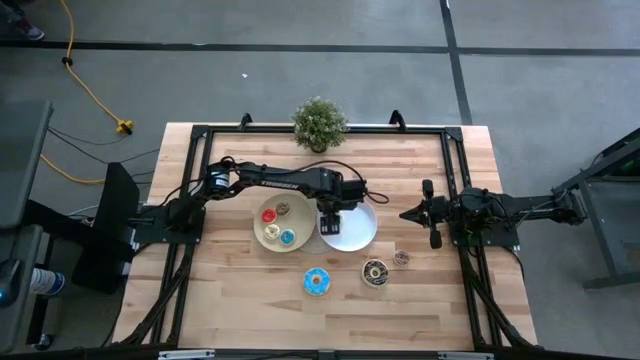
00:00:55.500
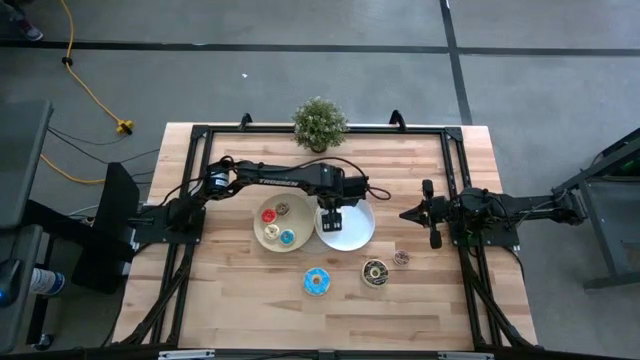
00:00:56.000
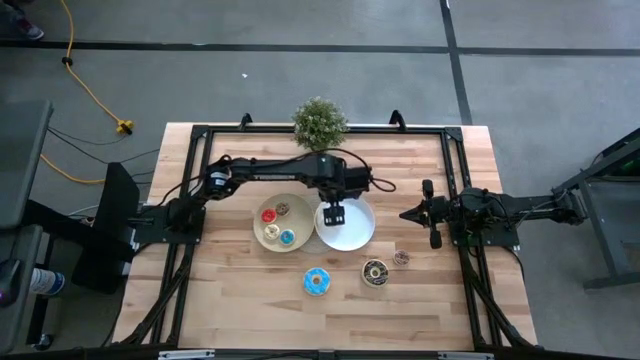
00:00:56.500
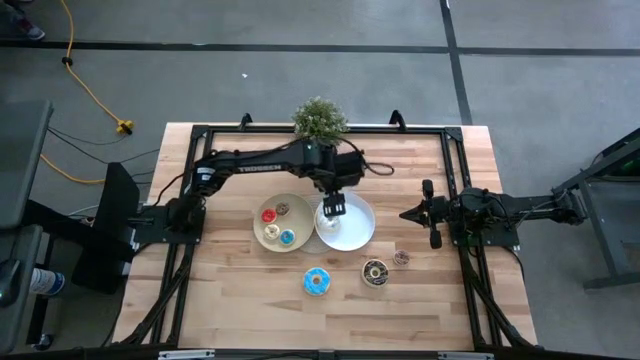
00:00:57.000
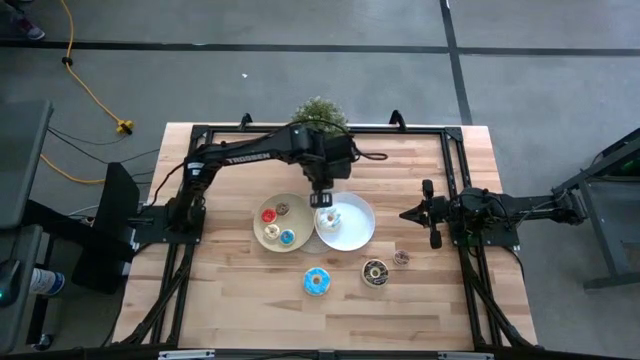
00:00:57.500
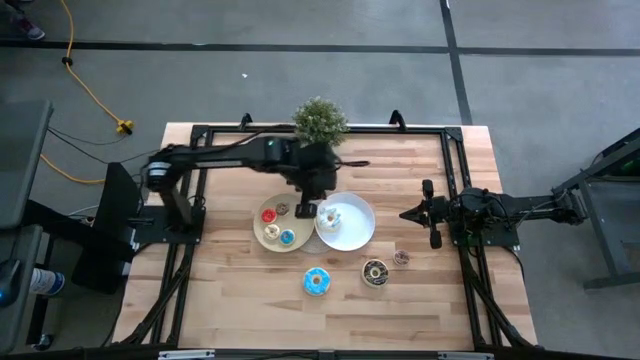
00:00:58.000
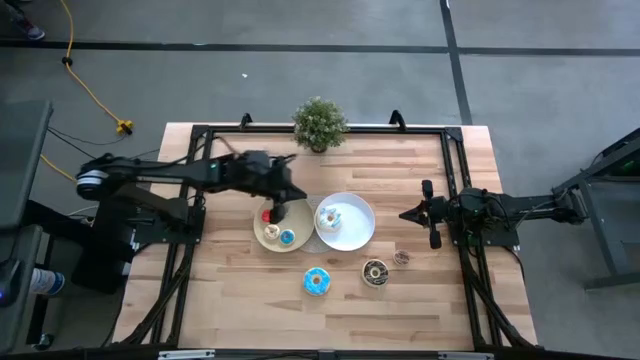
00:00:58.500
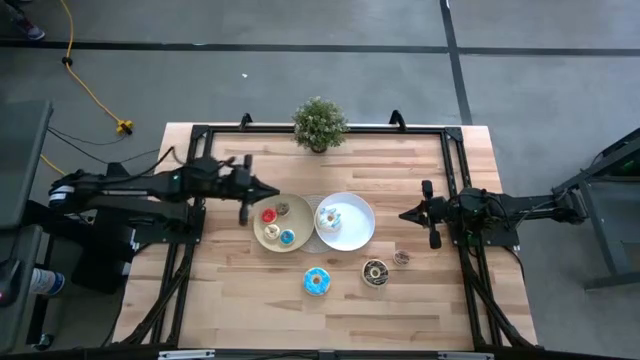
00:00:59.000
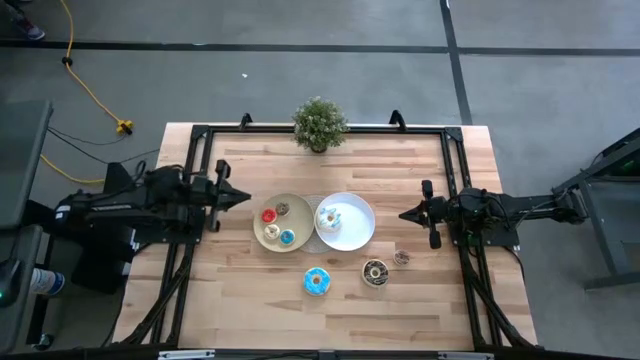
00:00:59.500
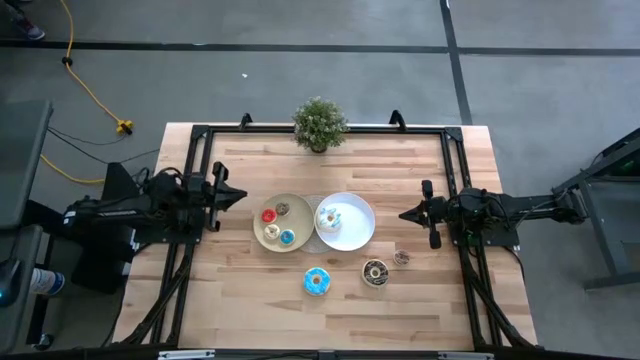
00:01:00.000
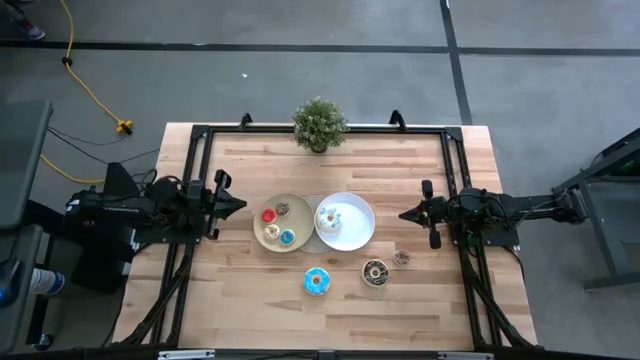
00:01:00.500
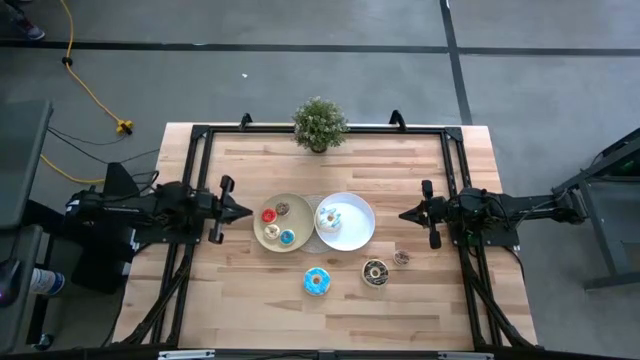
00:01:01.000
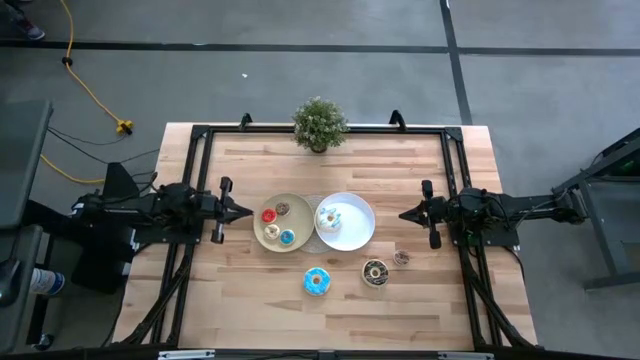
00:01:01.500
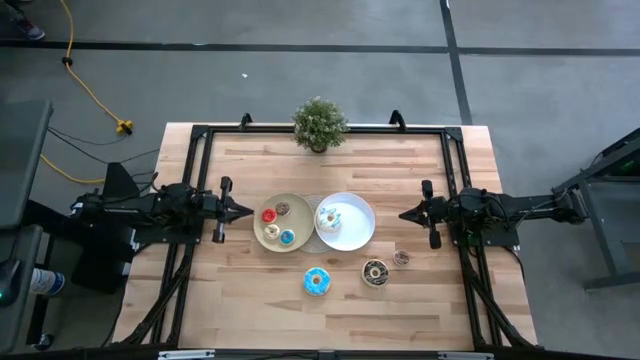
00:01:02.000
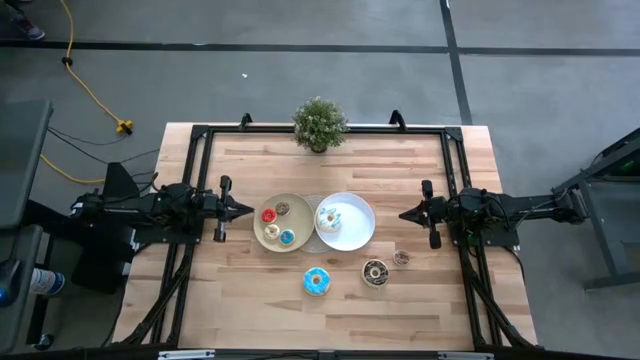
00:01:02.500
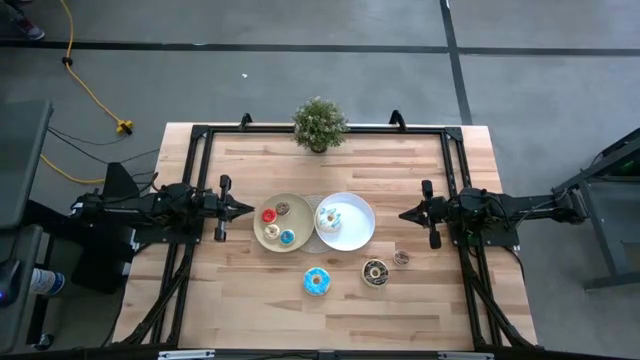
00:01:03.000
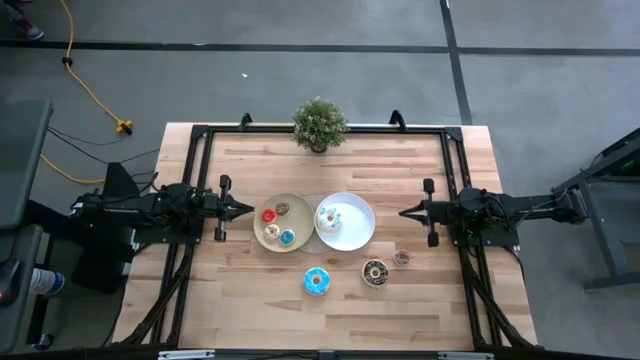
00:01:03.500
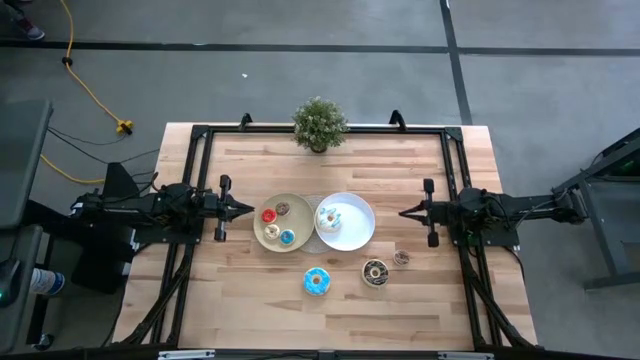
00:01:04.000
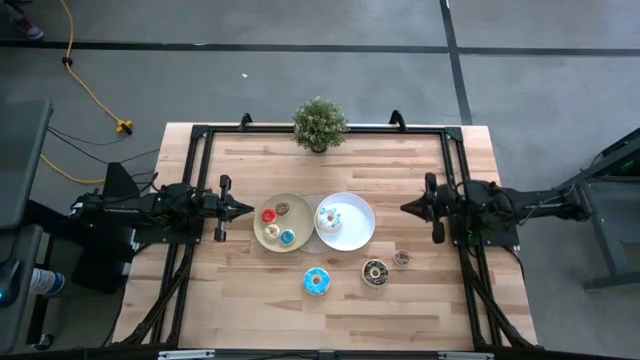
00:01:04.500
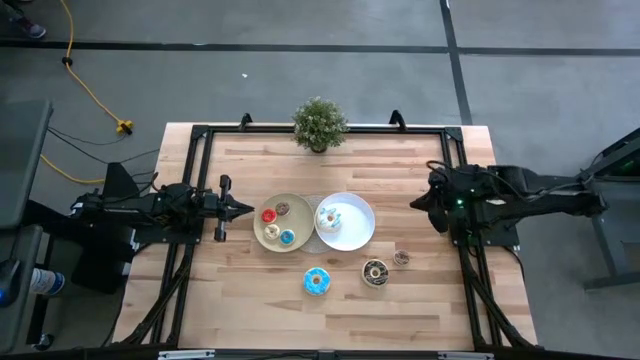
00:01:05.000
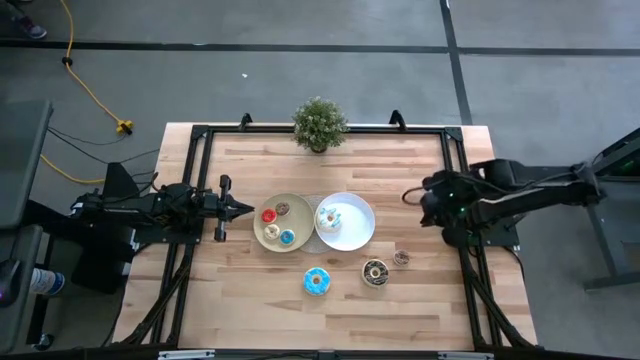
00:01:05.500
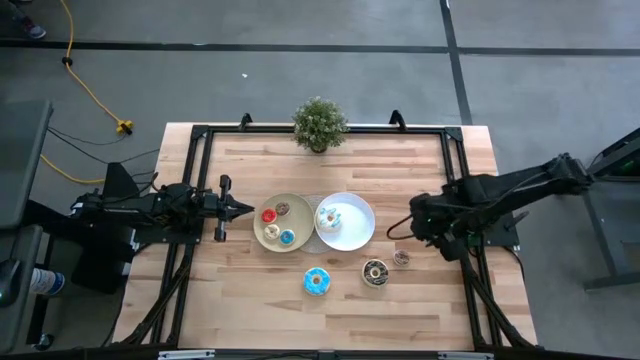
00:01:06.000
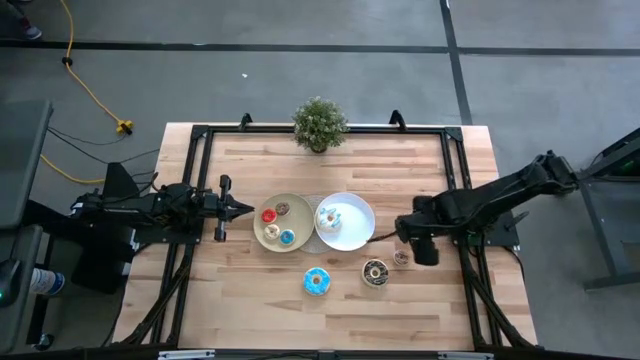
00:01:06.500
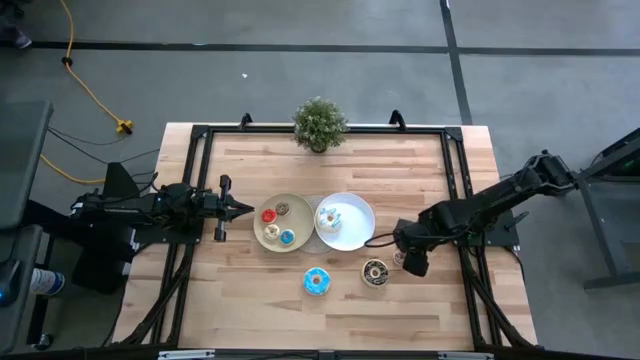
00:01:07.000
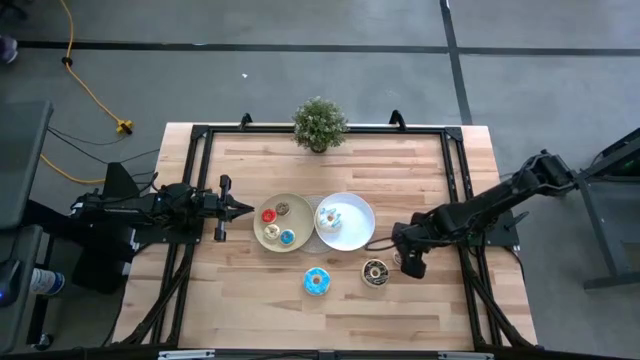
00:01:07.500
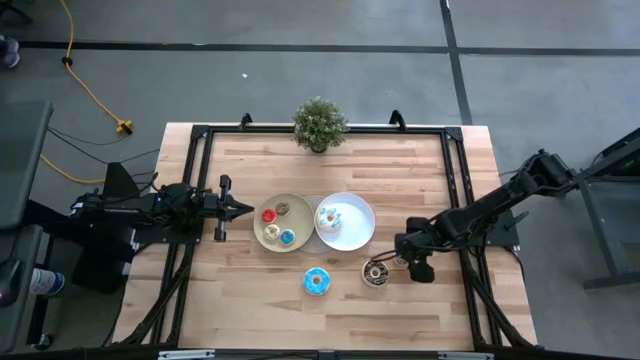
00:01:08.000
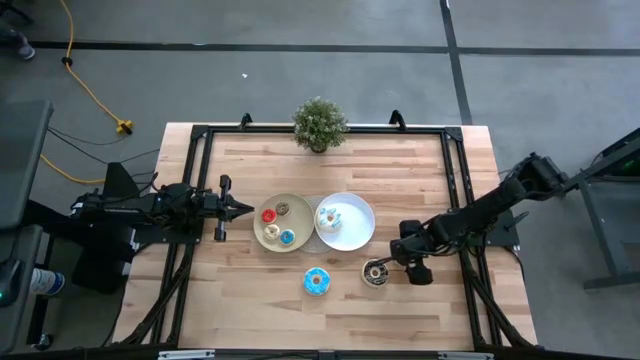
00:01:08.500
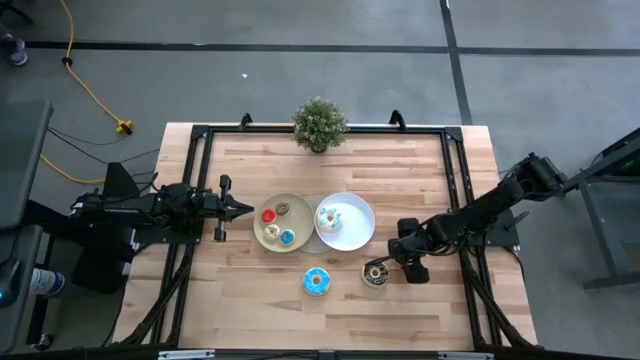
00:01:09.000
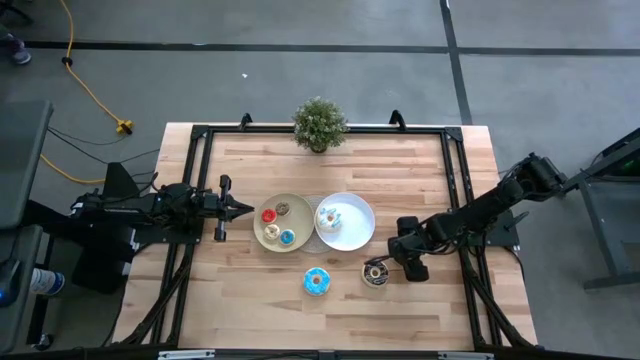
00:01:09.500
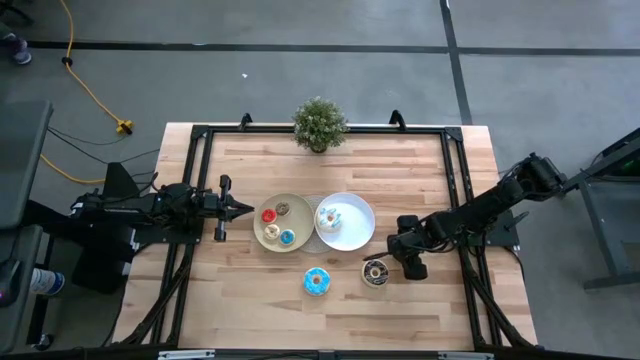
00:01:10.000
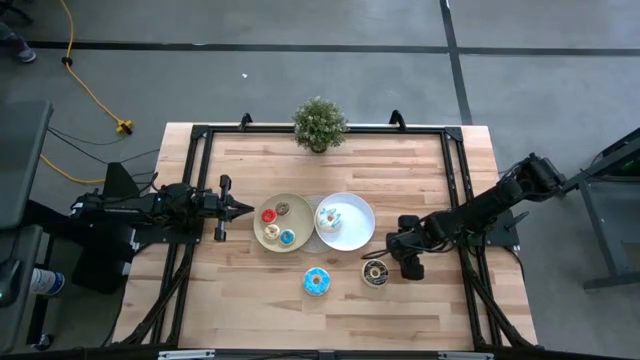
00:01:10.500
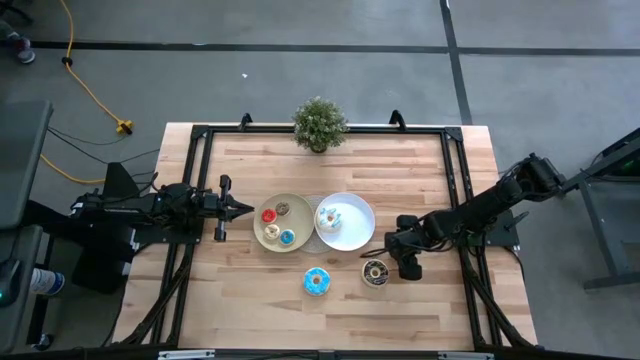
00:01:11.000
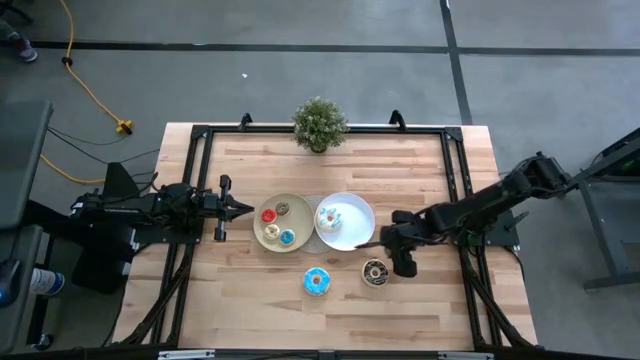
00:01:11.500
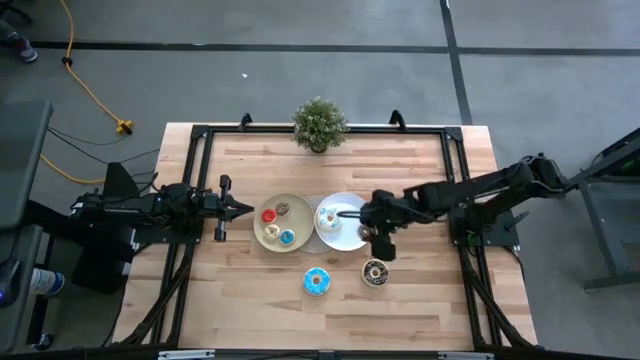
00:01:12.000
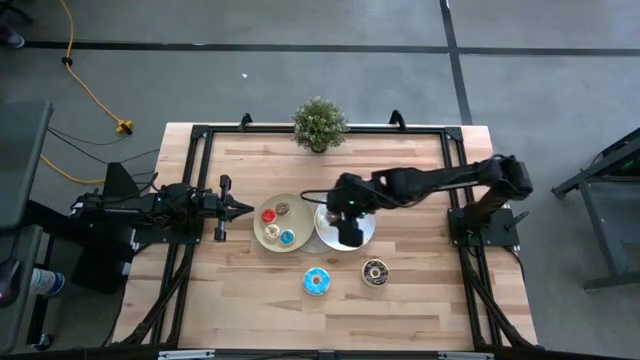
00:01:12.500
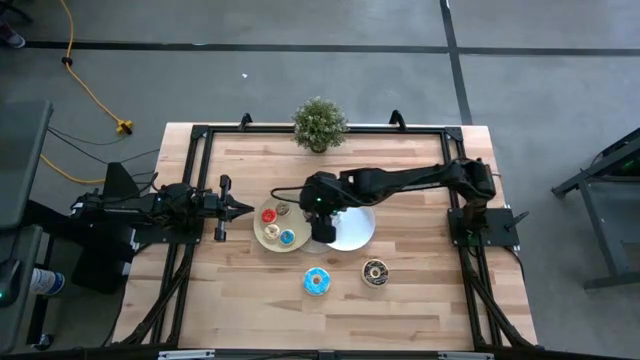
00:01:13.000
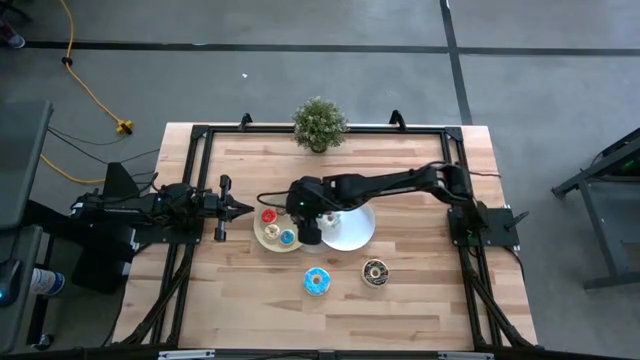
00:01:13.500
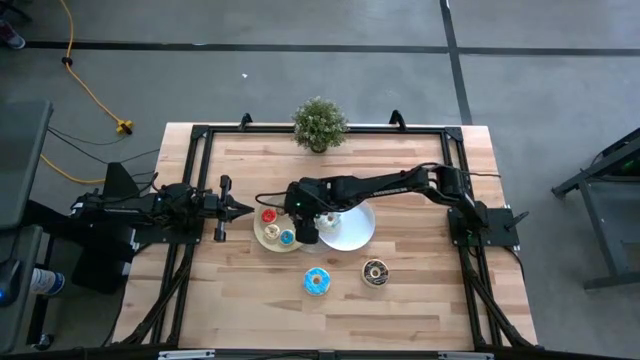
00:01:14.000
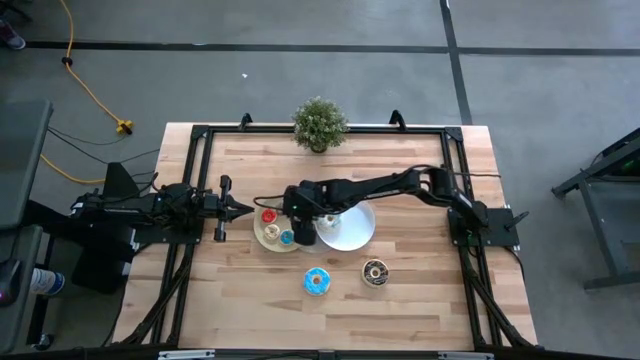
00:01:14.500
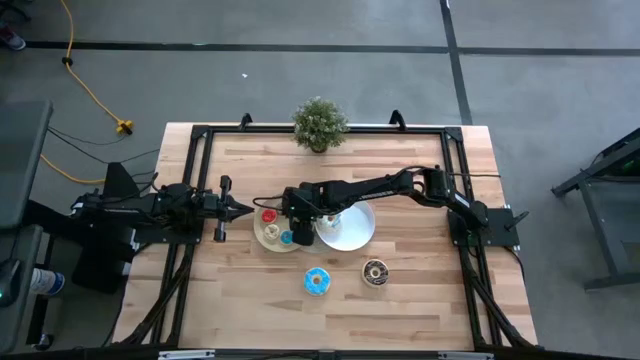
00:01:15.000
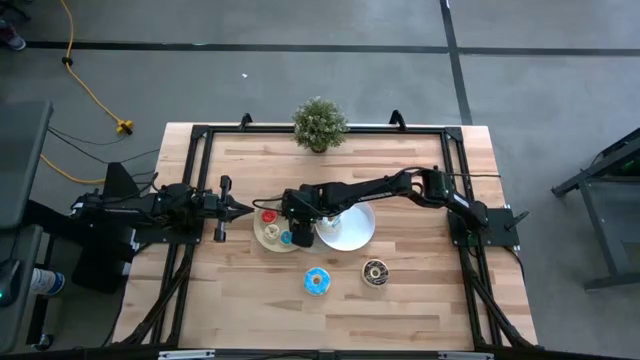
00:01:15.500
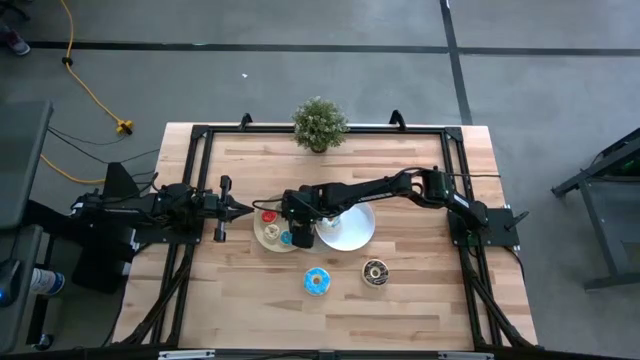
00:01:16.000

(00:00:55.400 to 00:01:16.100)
Task: Pick & Place donuts
Put the small brown donut on the brown plate
